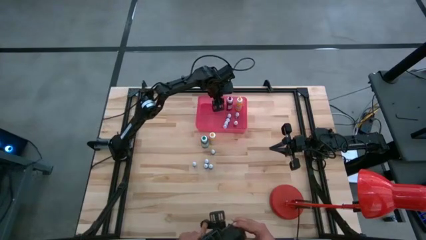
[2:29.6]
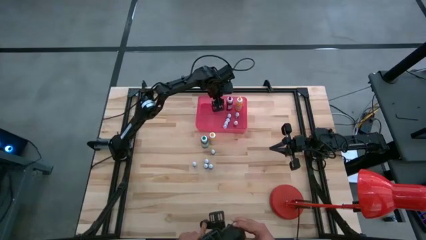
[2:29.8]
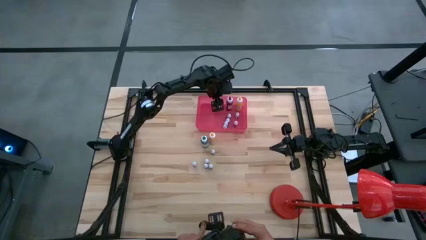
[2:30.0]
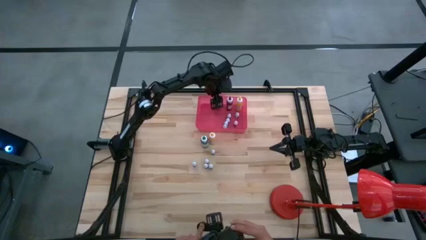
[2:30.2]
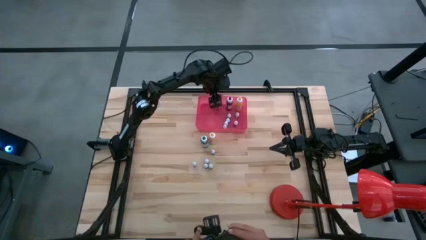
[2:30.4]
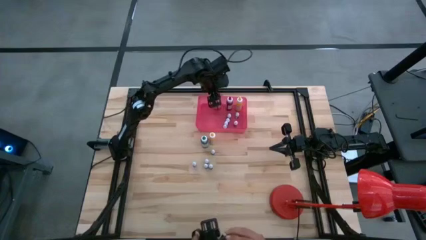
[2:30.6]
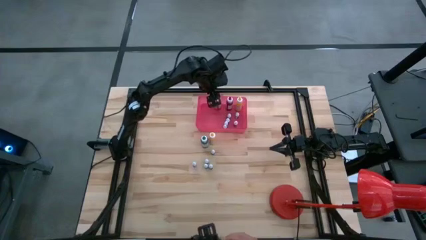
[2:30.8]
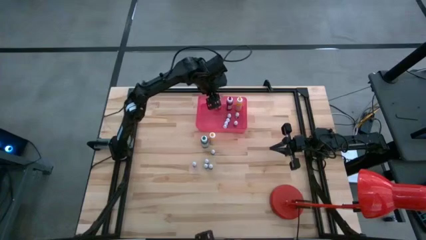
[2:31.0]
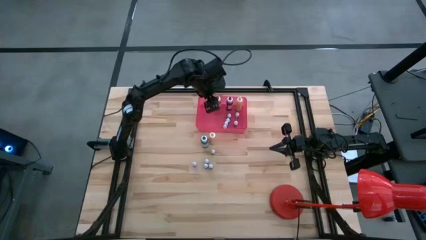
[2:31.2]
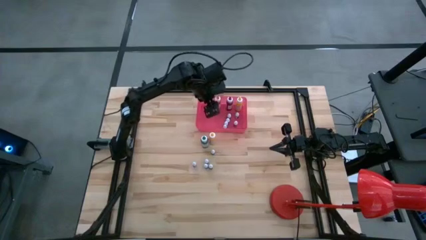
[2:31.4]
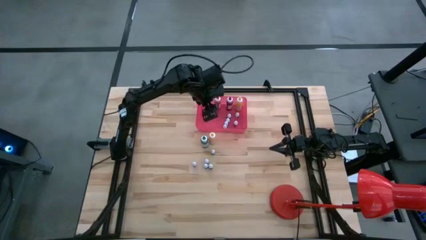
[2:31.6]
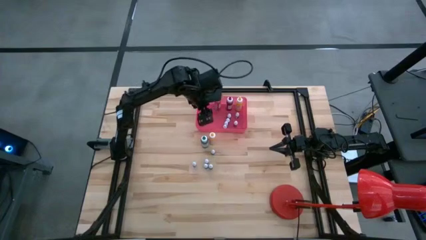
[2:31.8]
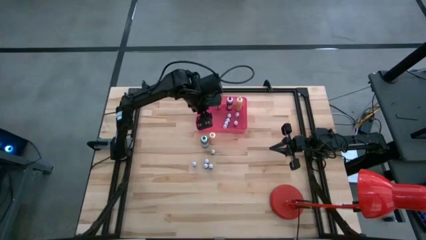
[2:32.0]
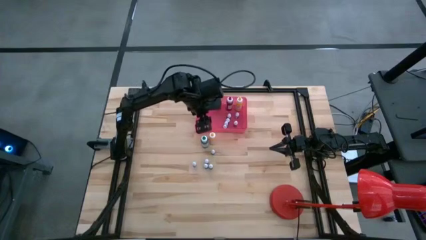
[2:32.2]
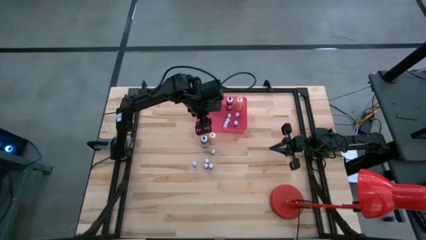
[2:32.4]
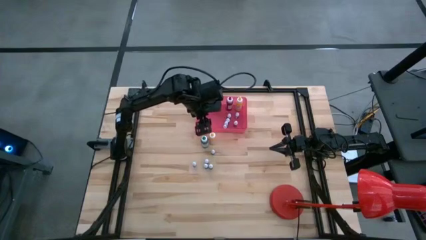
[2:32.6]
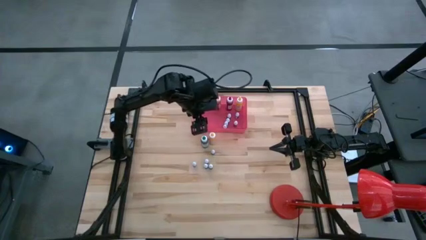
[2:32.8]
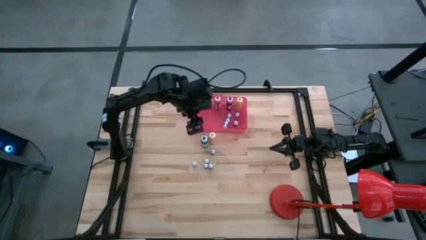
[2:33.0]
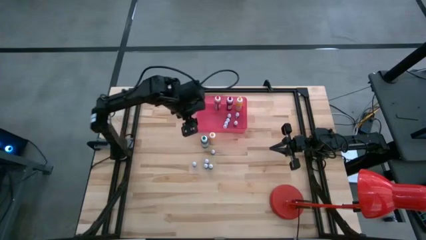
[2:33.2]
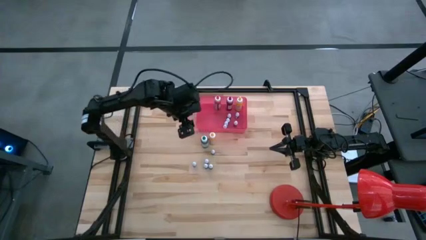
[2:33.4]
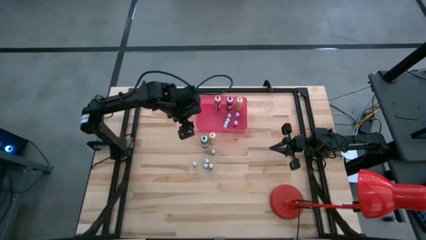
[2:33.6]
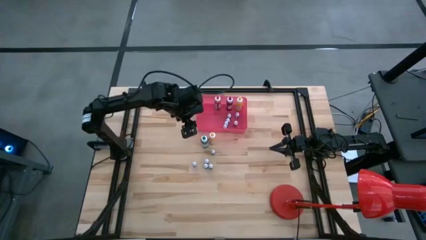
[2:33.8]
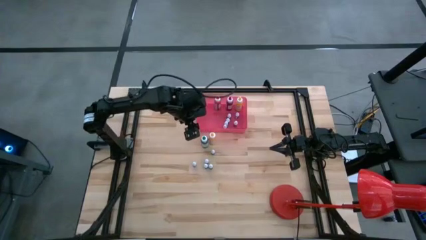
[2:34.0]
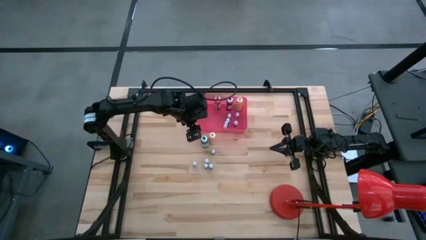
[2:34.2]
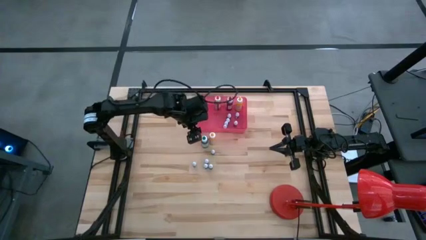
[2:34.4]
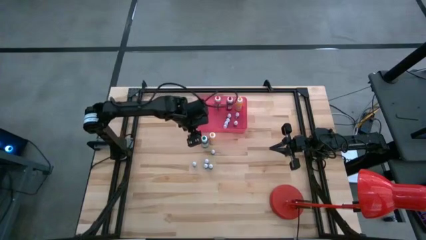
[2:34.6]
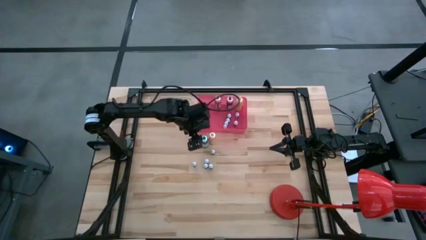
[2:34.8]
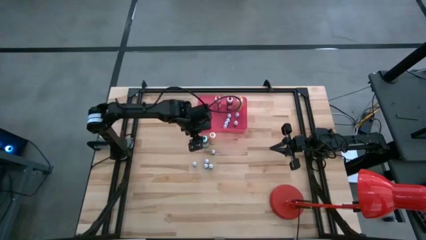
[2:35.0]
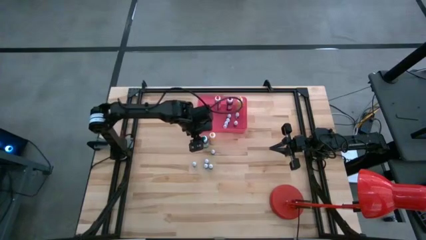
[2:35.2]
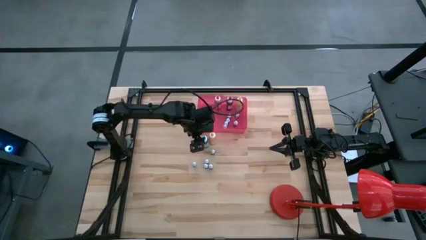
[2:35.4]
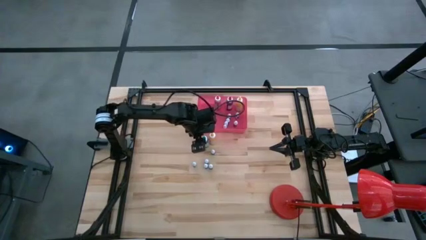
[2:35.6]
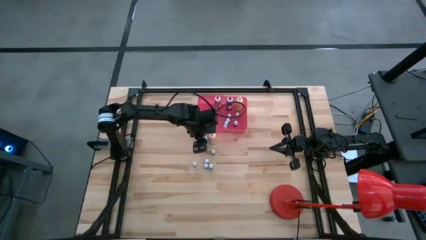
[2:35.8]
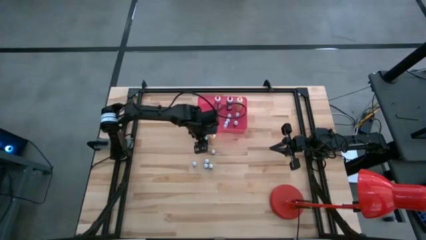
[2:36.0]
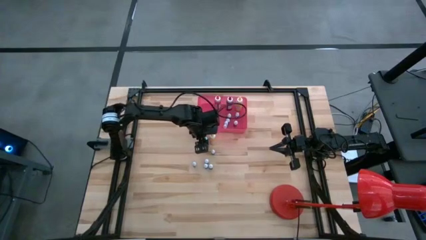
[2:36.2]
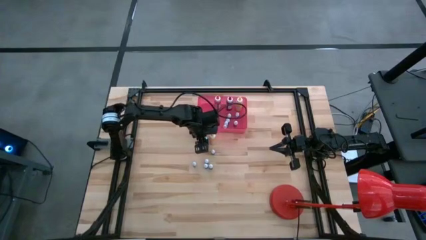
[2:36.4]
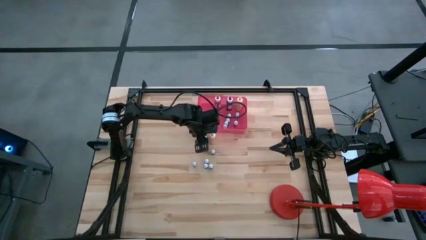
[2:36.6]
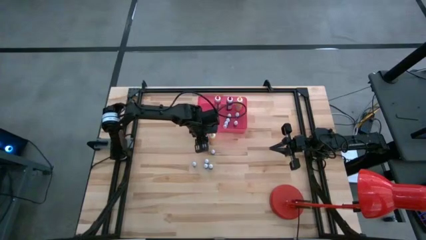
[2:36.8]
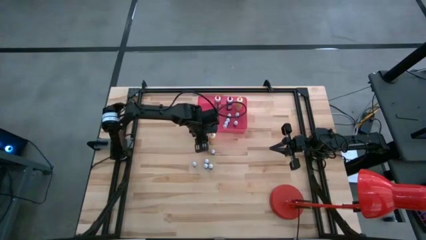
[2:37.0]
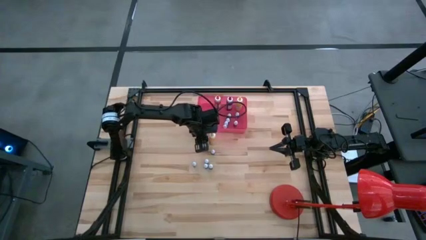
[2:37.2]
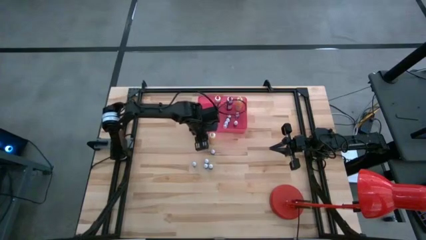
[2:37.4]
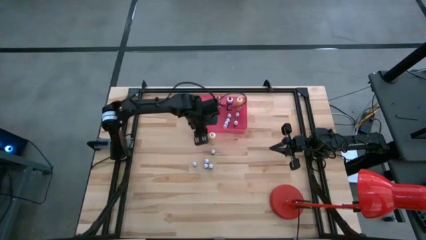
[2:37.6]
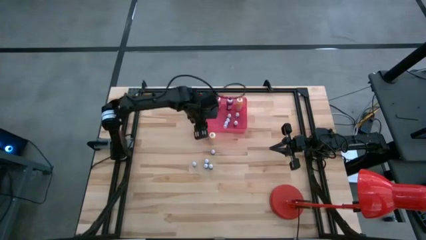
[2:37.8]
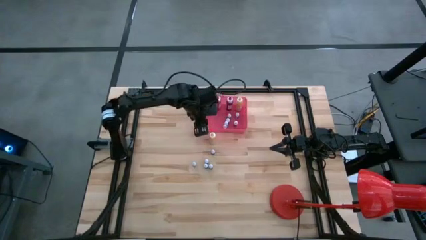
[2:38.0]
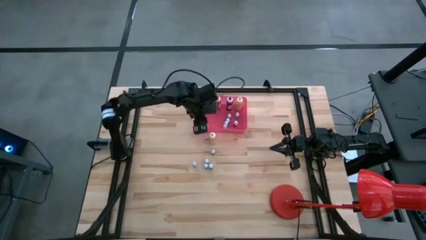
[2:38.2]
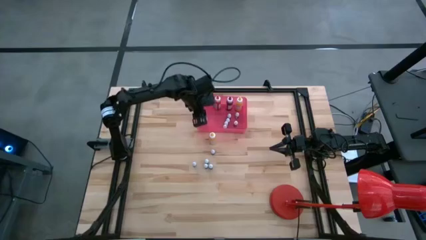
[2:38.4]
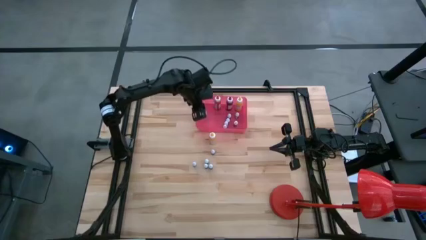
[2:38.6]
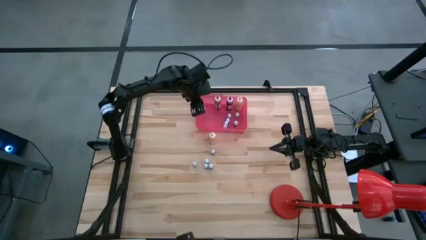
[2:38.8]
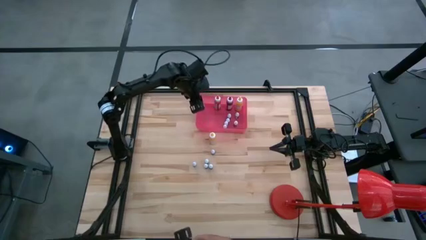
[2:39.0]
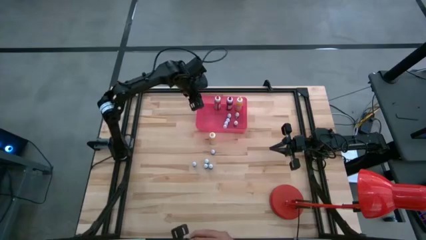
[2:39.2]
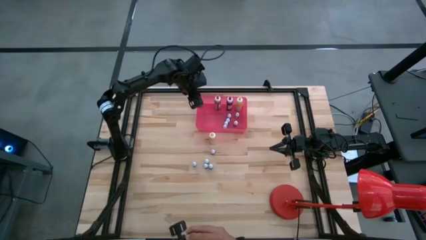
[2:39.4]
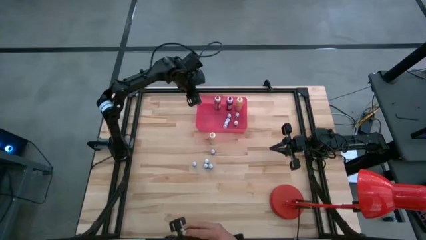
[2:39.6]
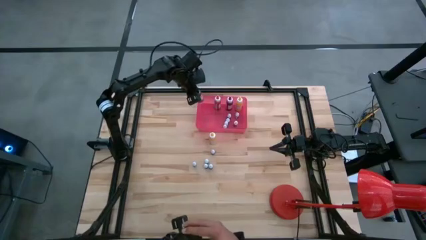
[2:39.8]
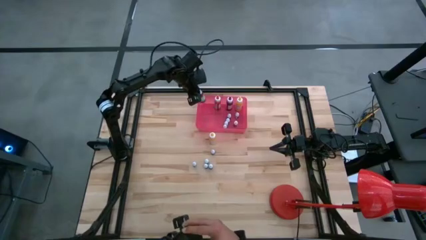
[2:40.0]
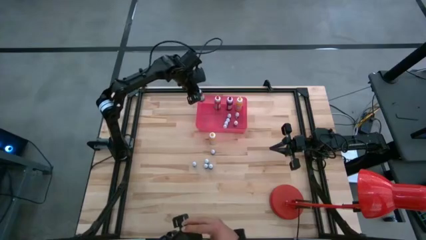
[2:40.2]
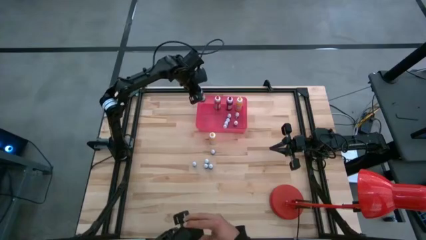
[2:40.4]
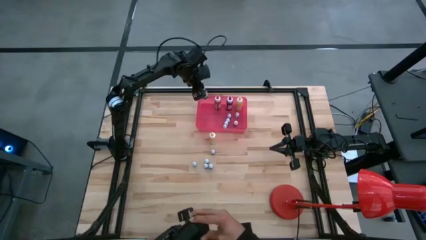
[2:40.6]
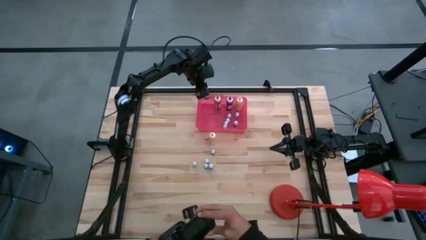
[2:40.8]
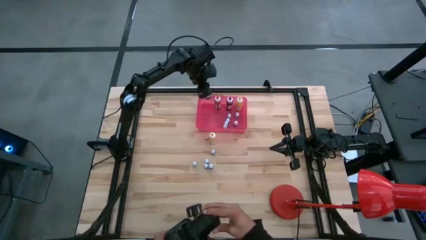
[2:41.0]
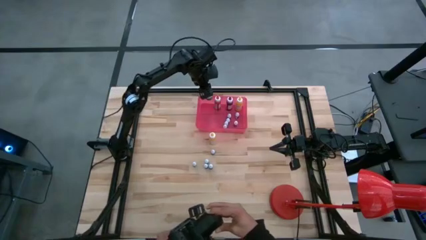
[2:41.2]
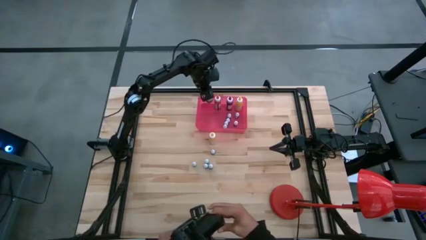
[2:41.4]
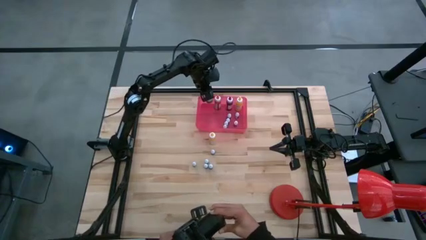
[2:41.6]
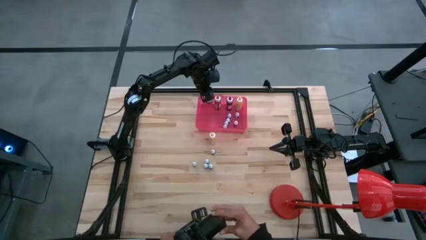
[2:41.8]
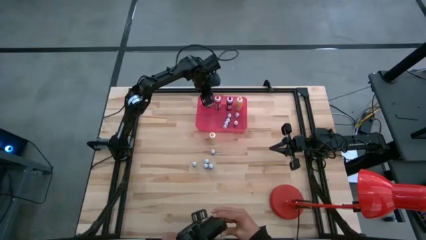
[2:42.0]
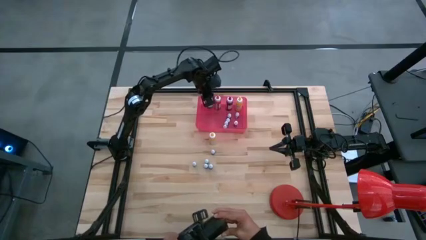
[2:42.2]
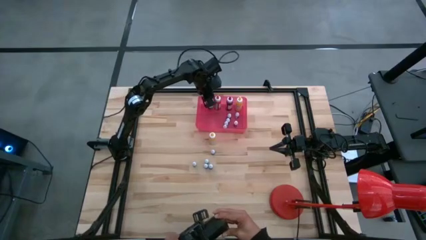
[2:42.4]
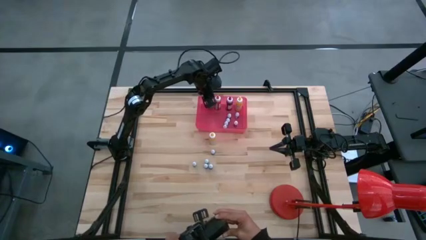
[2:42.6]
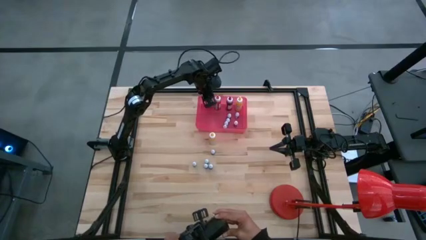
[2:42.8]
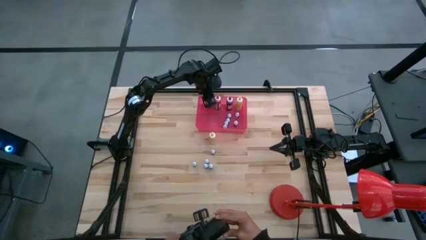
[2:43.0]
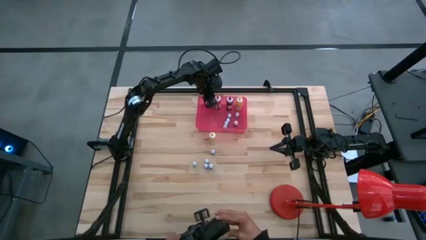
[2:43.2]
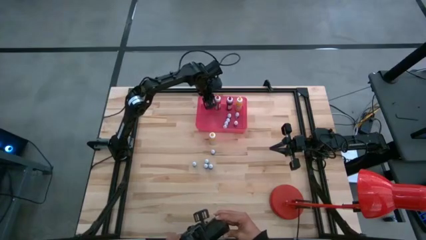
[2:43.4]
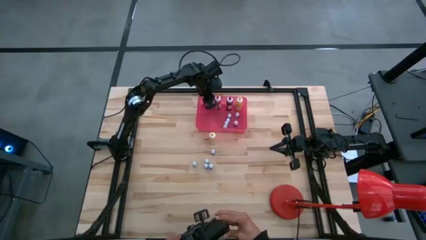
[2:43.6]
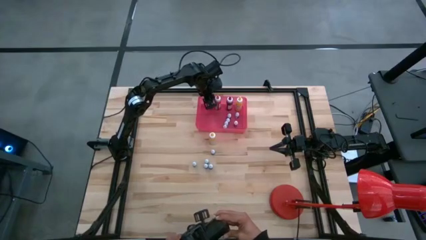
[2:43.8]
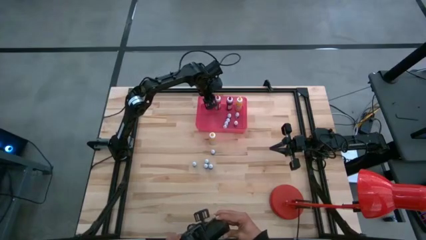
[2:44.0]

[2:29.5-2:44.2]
Task: Pick & Place food coloring
Put the large green food coloring bottle into the pink bin

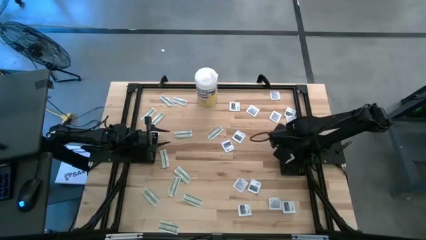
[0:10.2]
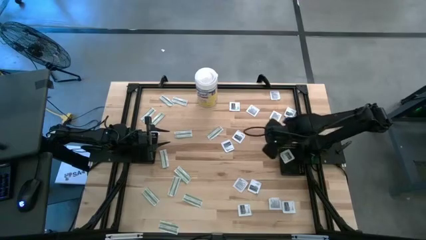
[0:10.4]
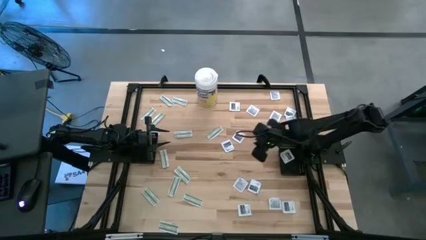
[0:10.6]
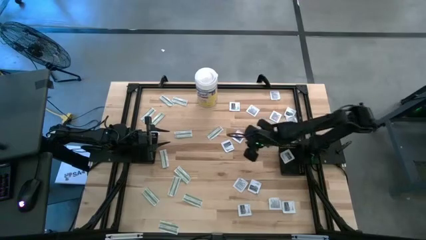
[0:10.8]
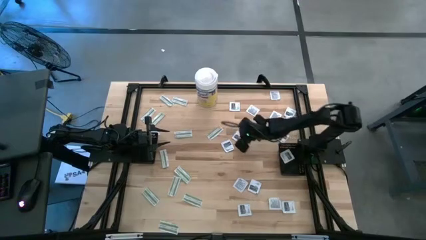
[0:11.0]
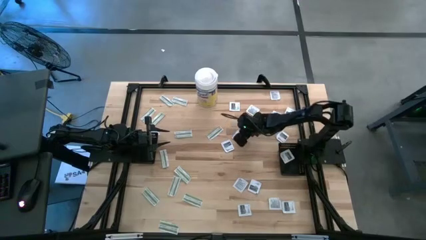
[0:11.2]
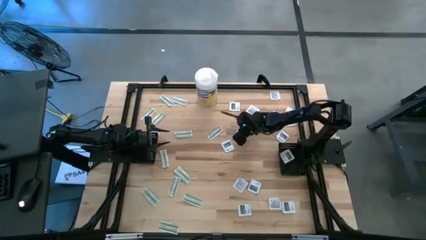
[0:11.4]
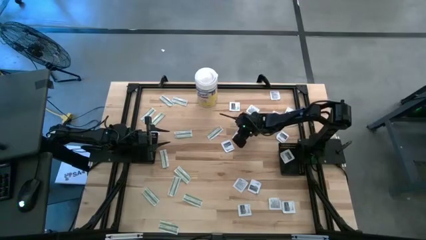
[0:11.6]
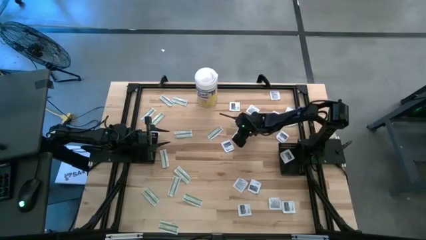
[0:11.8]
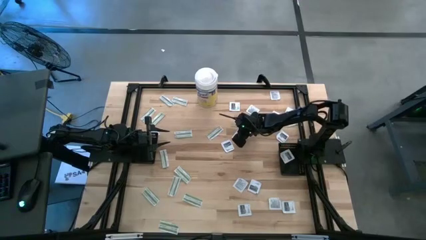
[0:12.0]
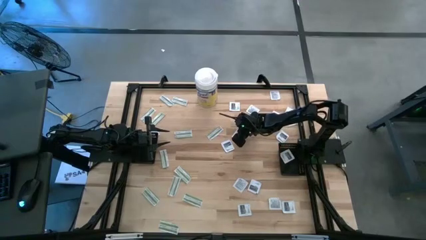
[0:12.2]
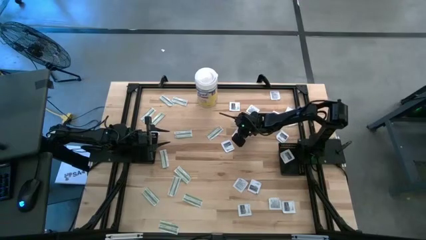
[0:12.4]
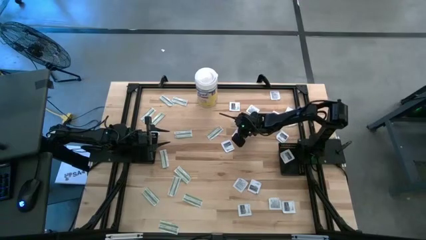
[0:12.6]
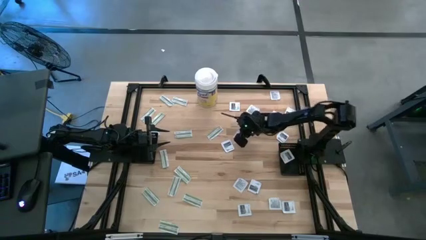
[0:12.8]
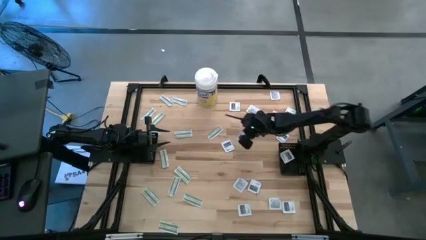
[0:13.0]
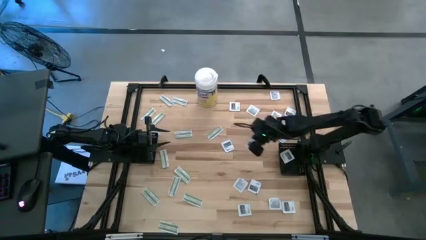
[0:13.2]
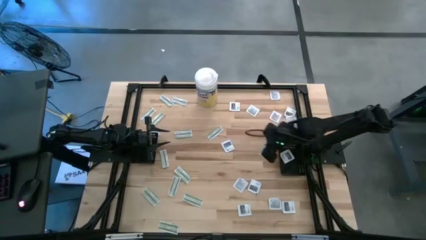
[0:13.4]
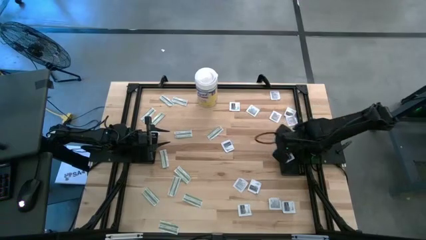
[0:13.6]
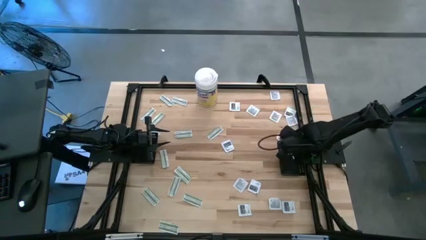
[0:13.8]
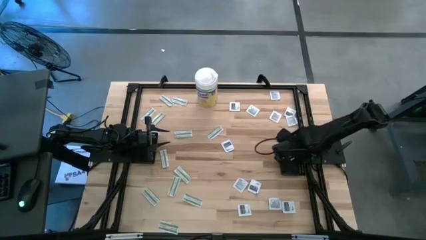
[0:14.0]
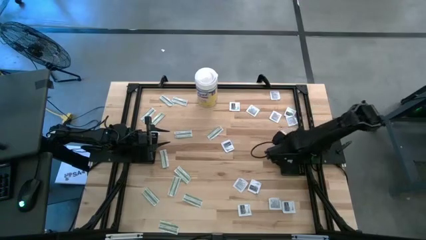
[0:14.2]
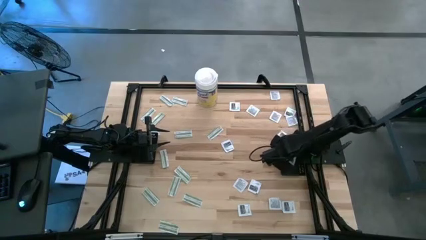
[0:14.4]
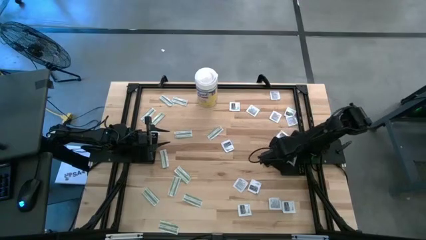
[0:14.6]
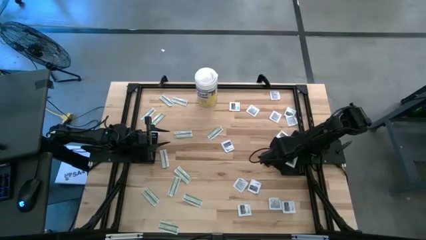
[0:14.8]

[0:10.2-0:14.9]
Task: Pick & Place First Aid Supplies
Put the towelette pack into the right black basket
